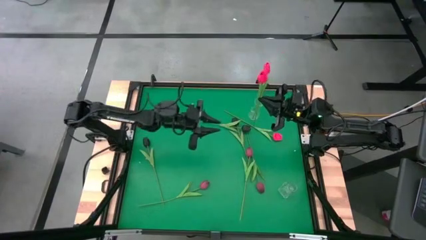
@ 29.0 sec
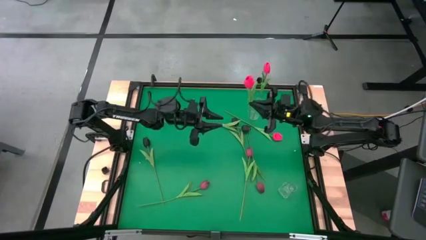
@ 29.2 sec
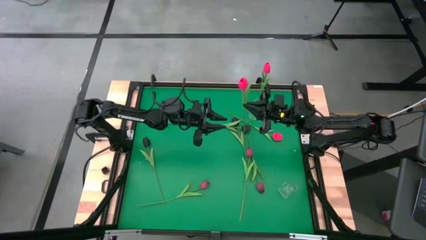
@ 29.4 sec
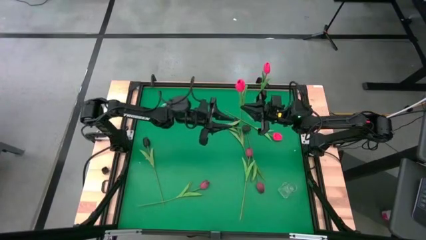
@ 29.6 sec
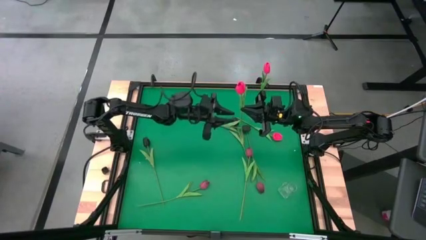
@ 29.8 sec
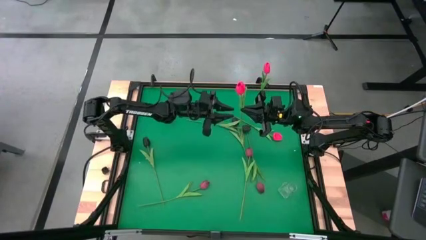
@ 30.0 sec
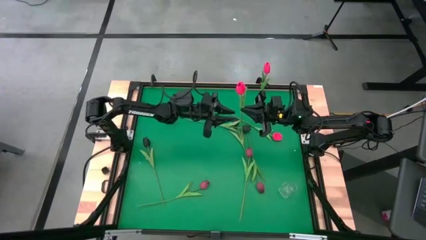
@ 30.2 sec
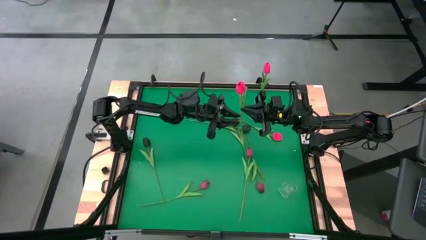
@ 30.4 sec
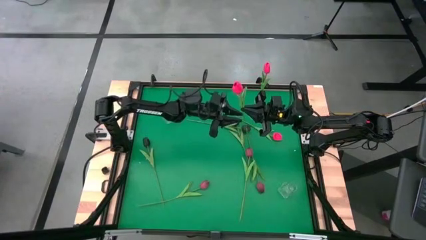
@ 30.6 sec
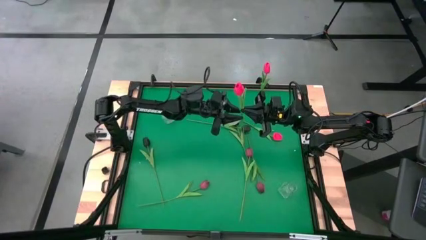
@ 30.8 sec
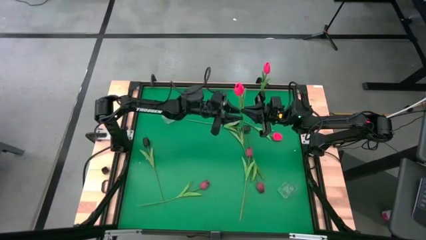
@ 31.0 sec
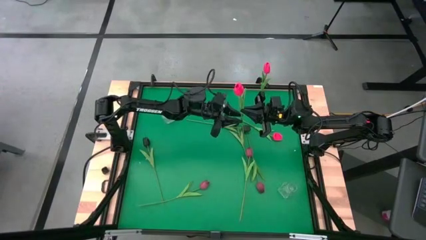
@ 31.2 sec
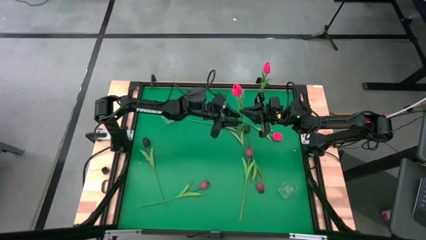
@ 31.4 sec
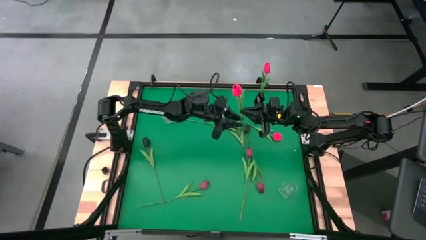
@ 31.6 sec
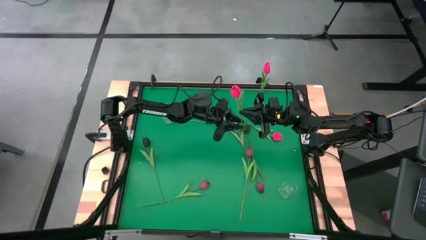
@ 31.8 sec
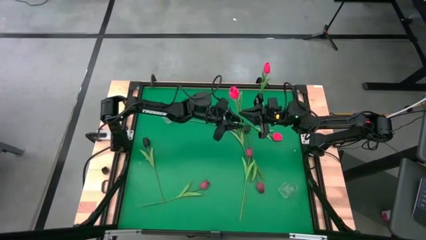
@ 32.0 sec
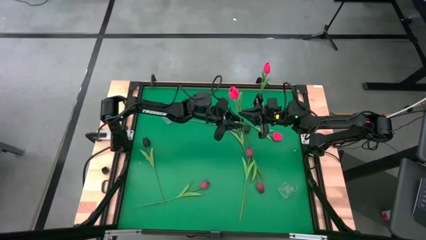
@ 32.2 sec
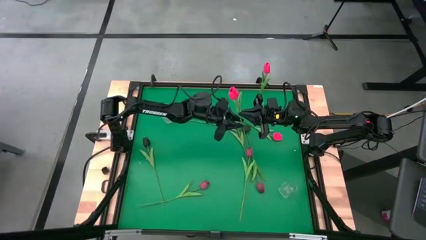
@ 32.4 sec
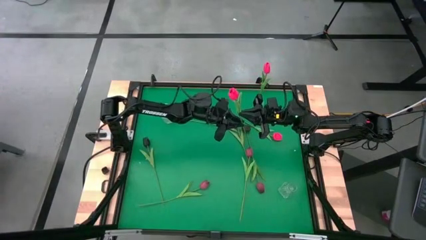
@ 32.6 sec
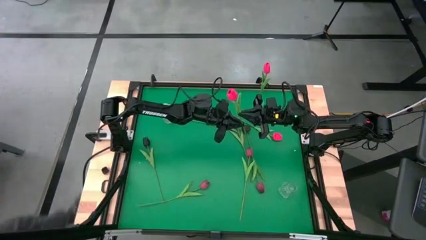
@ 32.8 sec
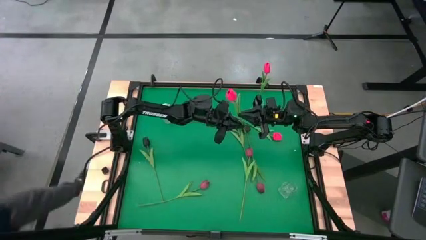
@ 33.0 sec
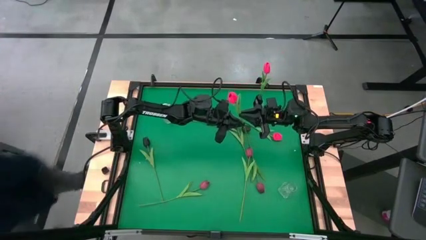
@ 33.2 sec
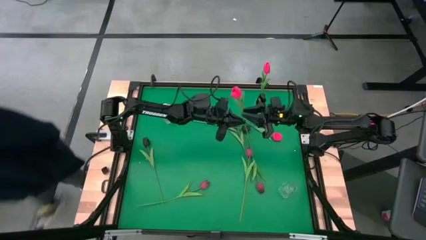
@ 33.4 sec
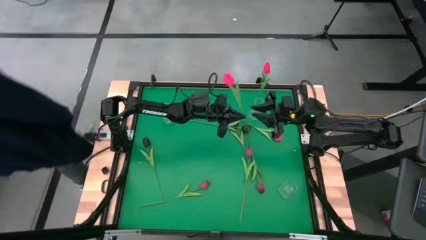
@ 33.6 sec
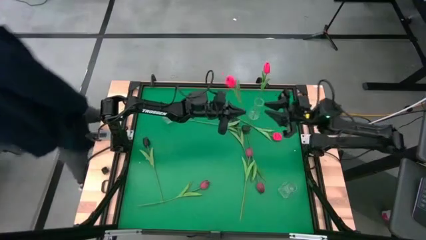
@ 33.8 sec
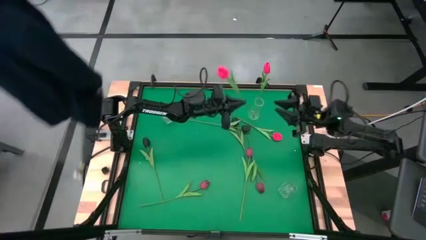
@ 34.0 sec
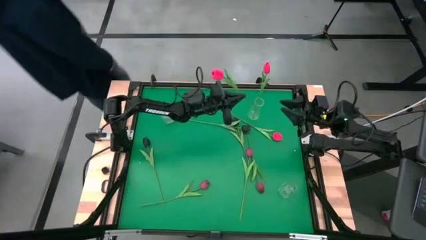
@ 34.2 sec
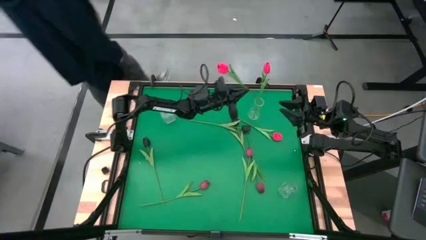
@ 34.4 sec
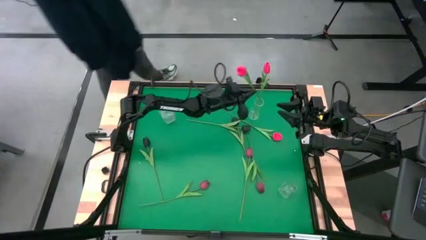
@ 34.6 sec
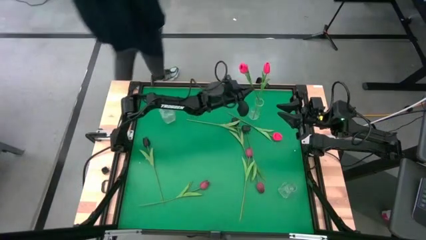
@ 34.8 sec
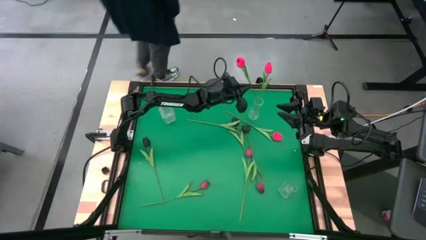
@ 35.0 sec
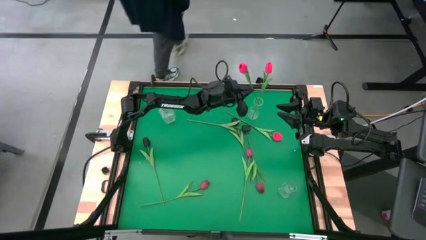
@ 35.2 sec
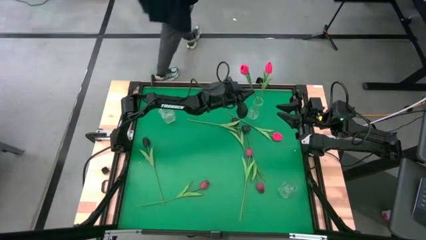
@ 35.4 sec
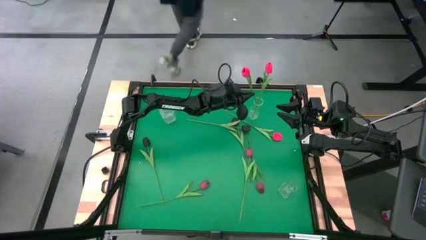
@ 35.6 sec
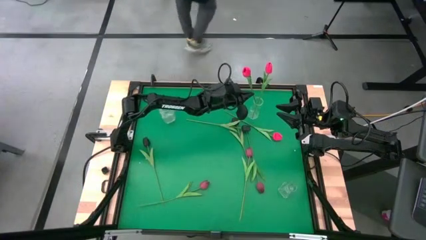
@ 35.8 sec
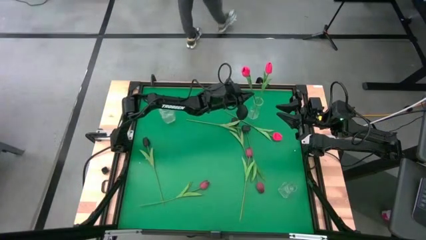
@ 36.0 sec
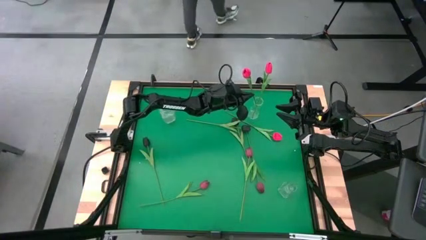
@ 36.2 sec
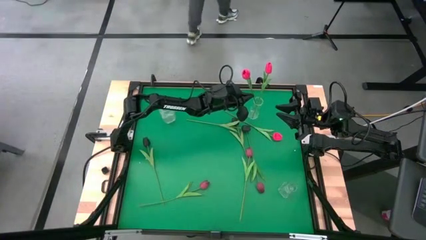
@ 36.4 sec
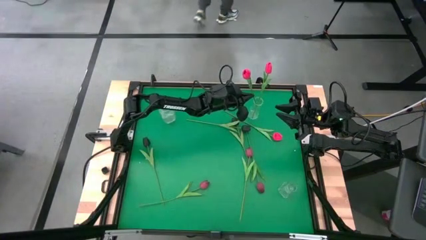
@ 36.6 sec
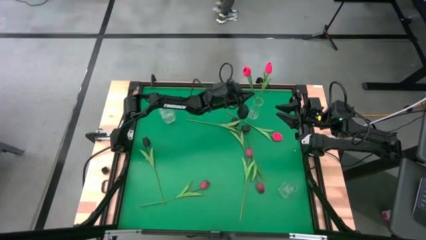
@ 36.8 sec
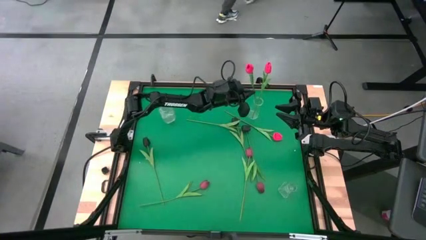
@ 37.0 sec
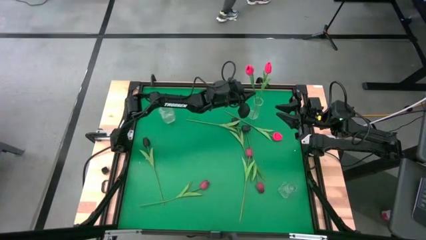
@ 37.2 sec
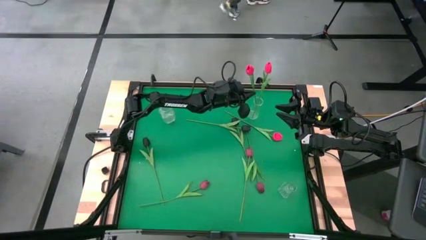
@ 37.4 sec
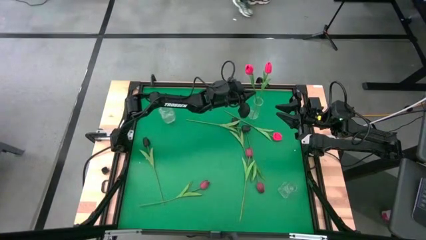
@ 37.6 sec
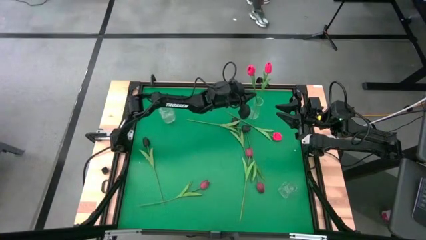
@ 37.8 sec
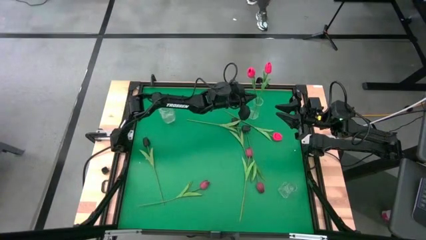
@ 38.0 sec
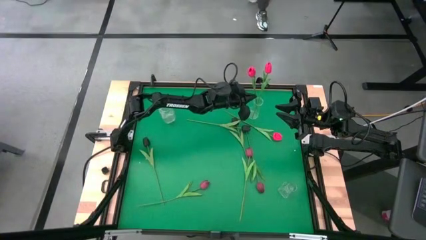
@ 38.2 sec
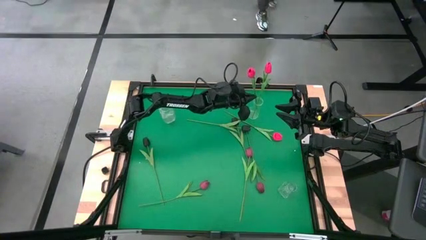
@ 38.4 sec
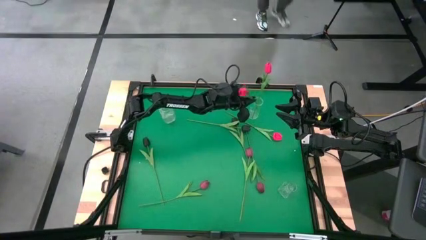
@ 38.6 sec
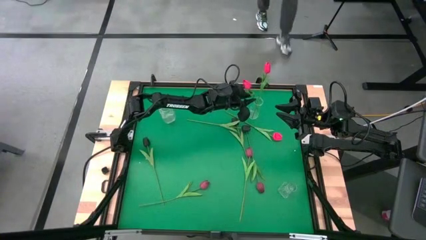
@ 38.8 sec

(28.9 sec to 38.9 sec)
Task: Sort flowers into vase by color
Put the left pink flower into the top right transparent vase
